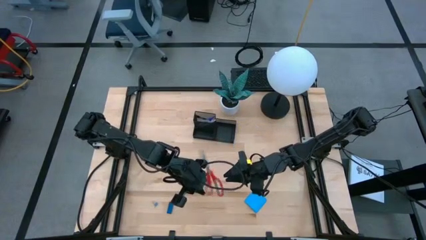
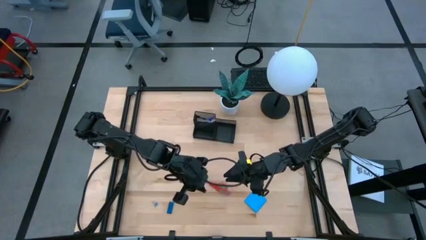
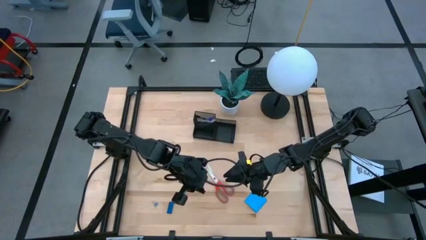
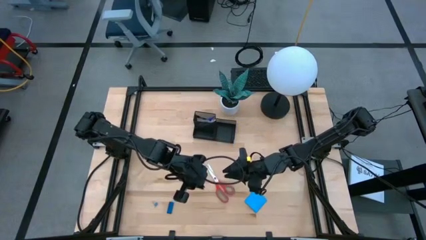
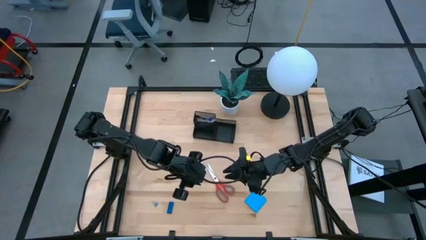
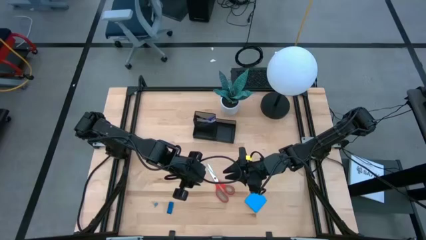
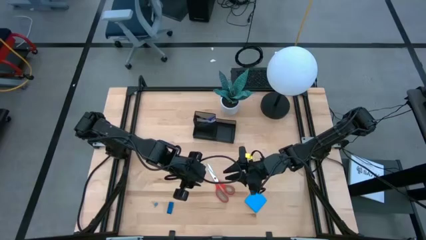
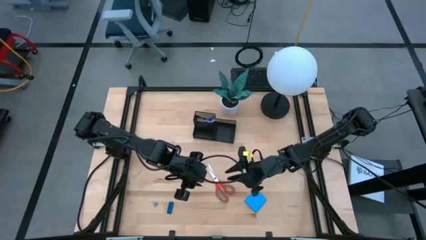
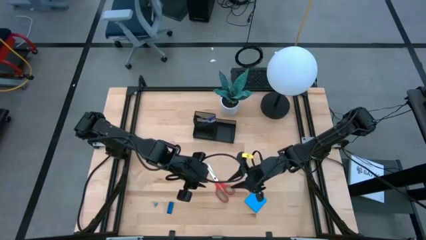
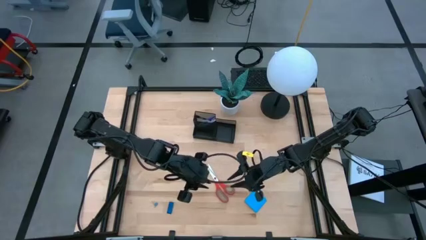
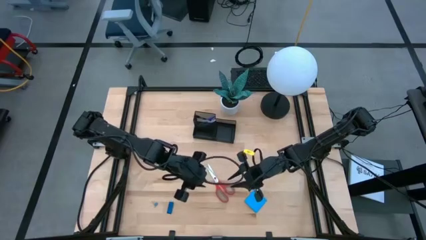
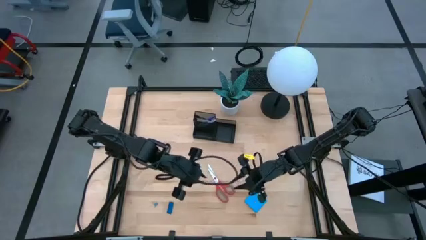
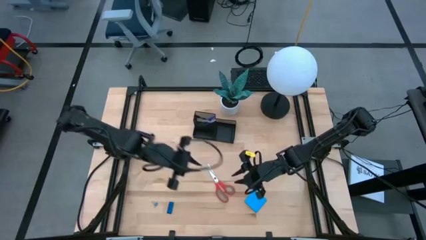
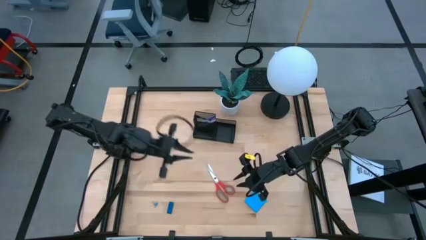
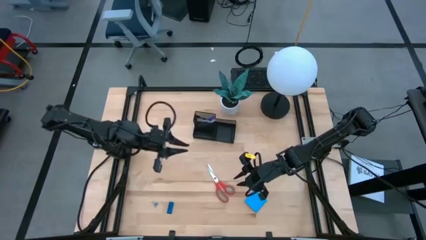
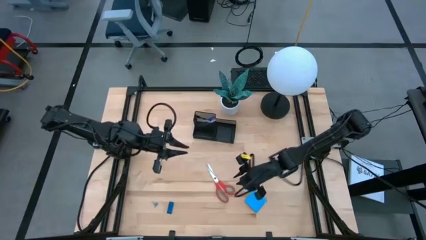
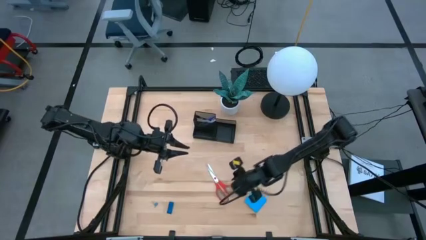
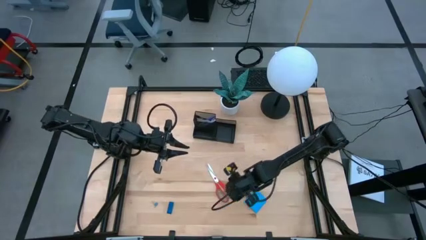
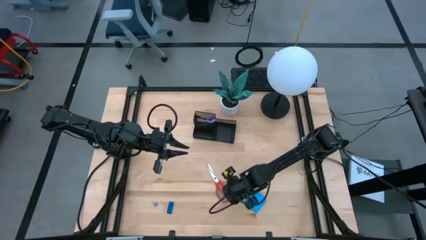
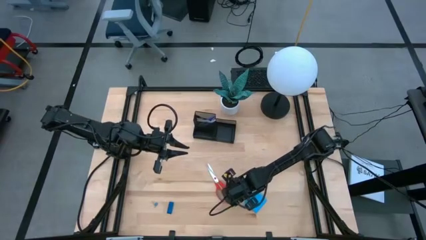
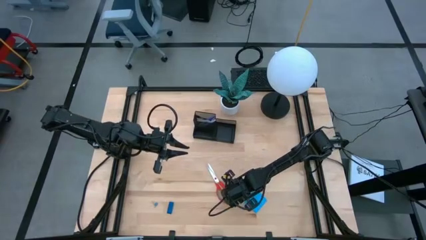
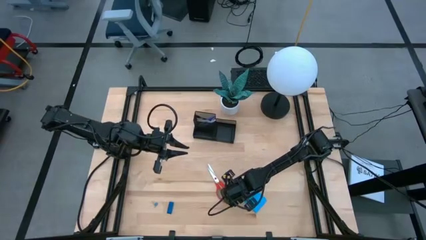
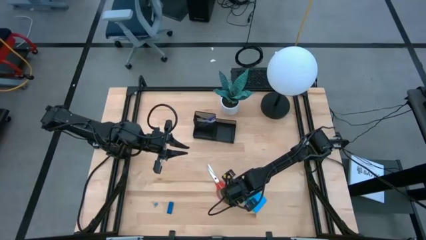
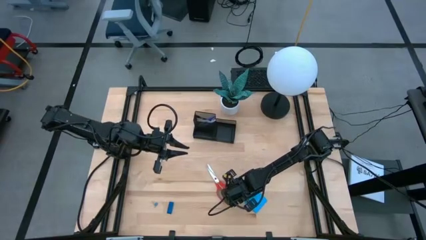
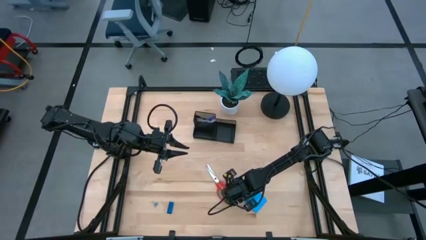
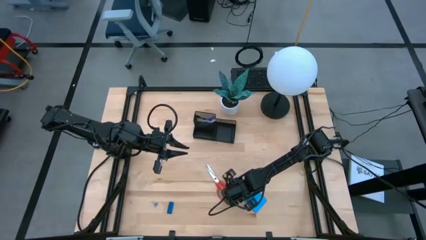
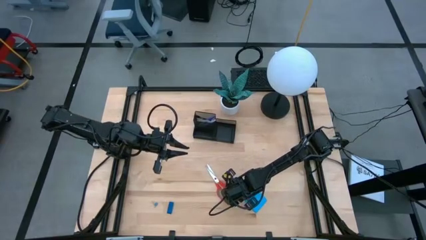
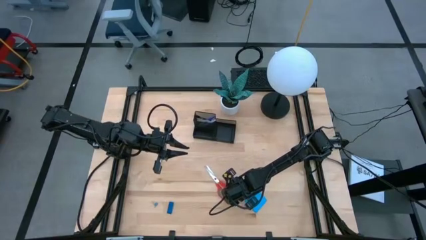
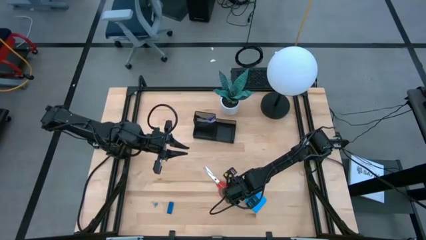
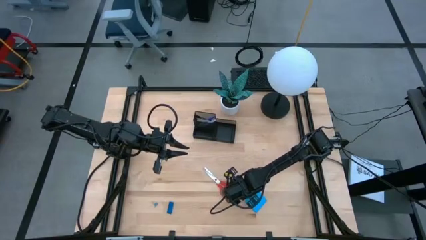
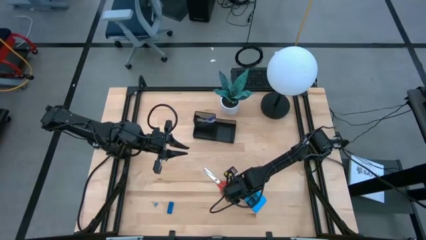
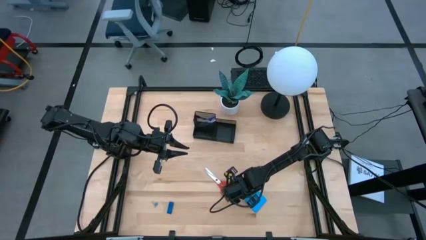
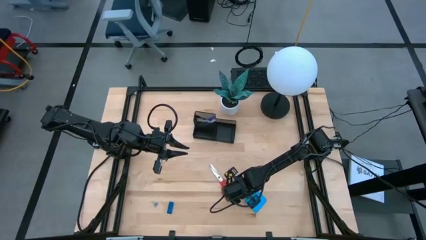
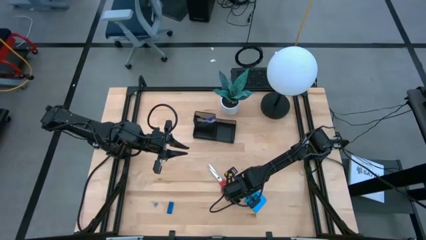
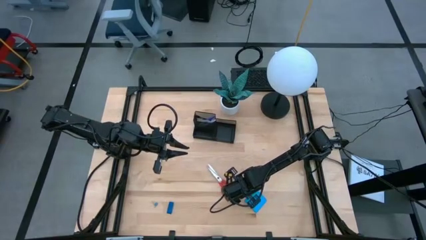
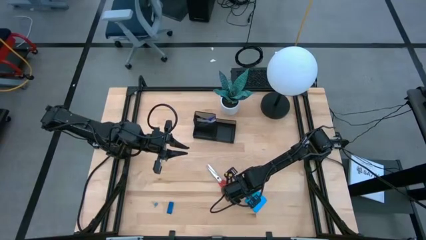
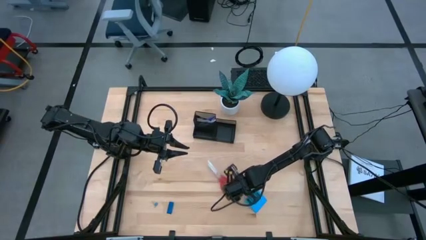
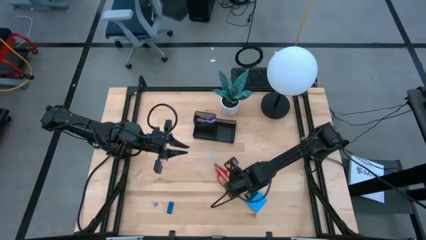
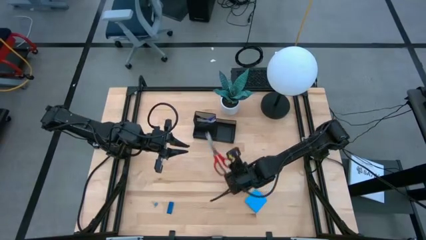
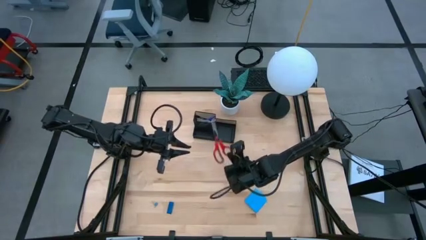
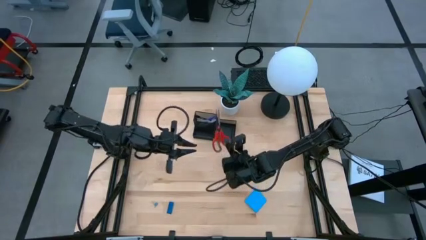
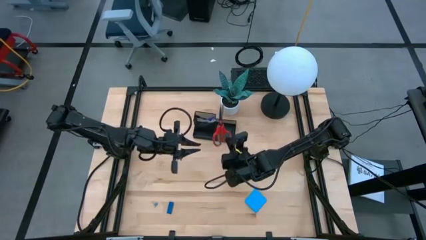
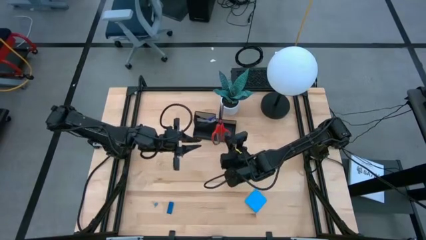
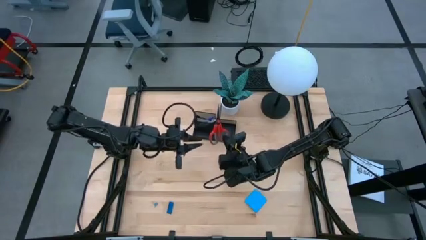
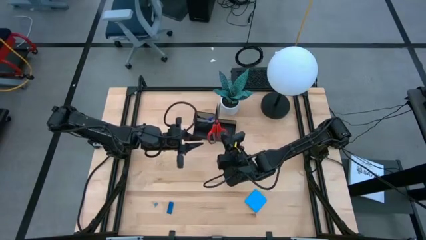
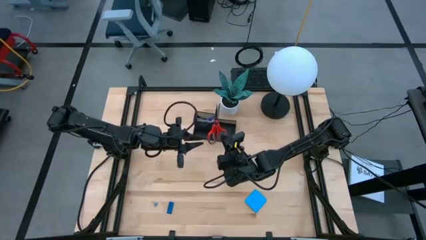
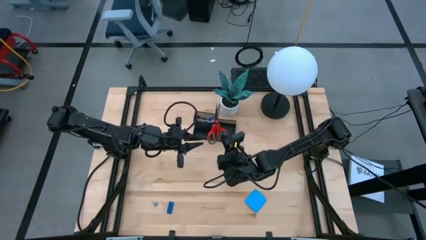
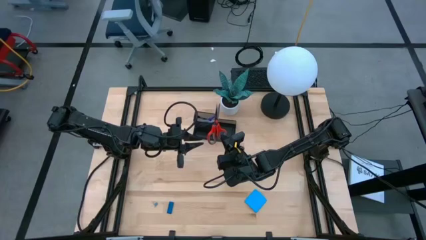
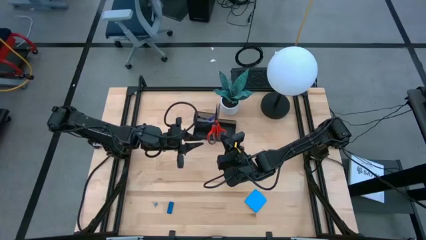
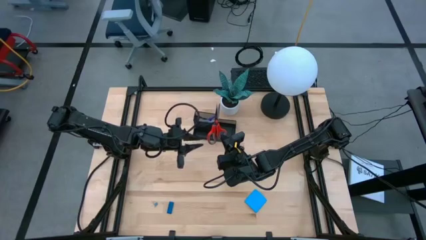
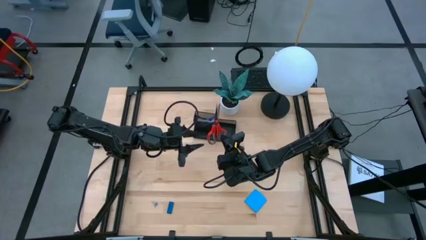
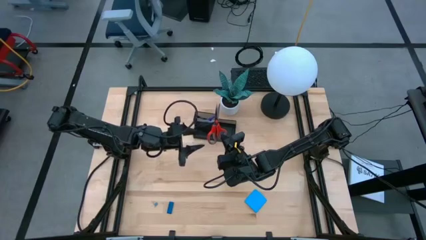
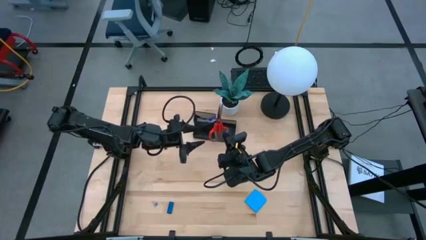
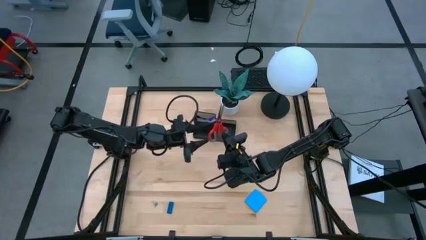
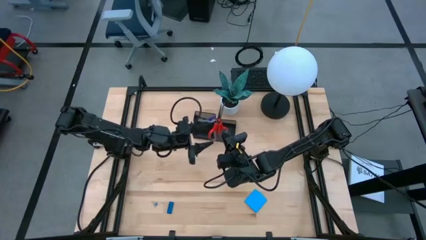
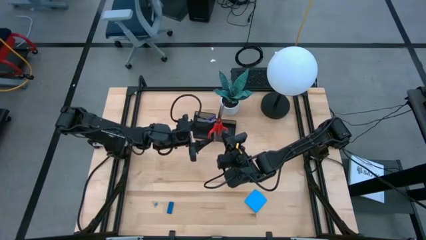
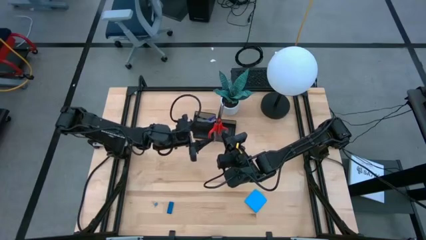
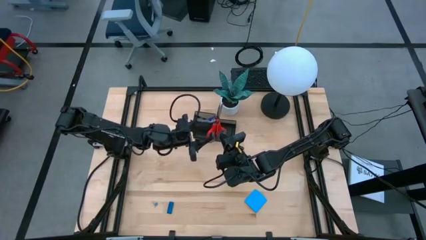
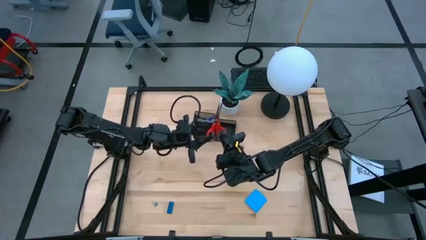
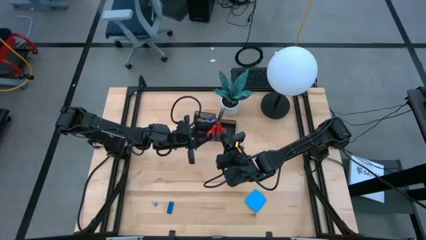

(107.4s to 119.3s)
Task: Pick and place office supplies into organizer
Put the red scissors into the black desk organizer
